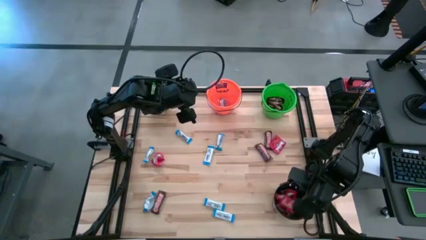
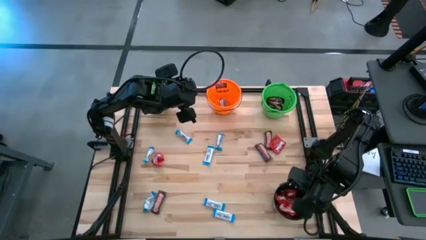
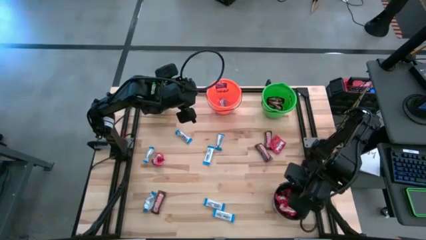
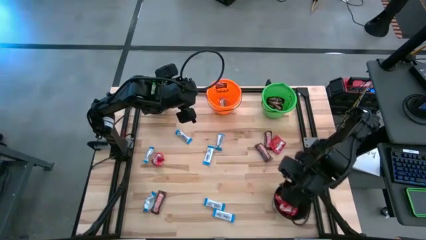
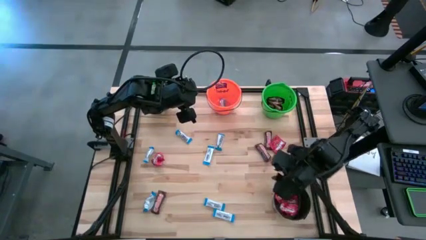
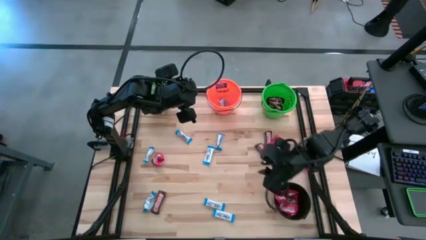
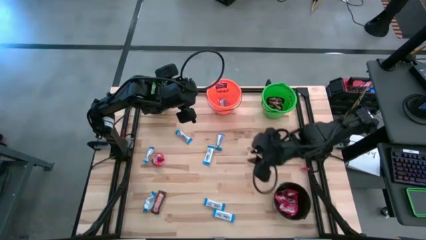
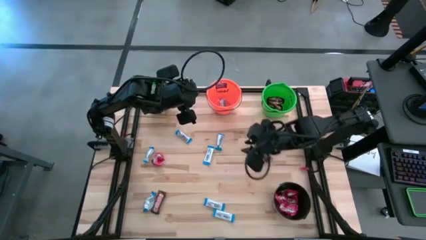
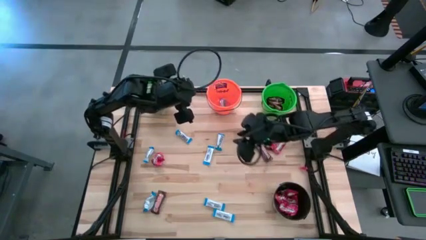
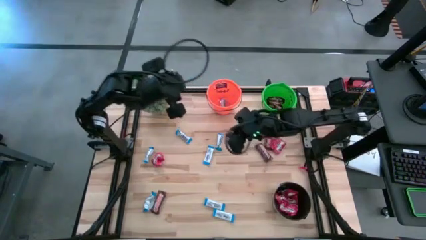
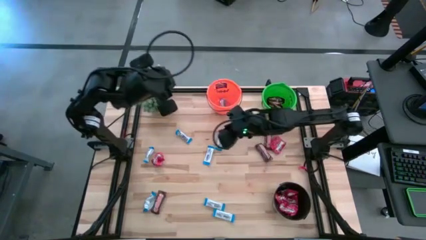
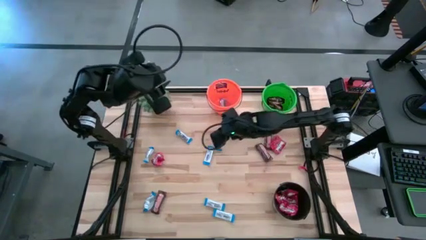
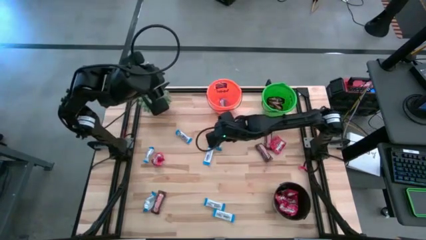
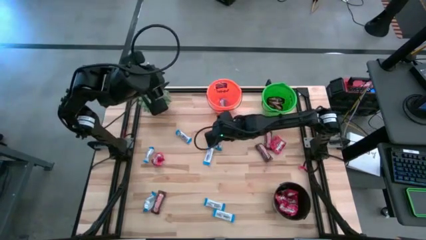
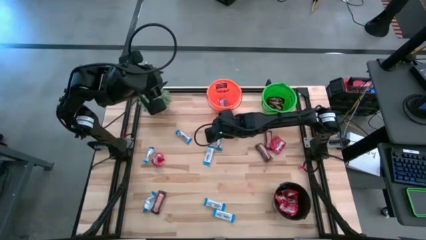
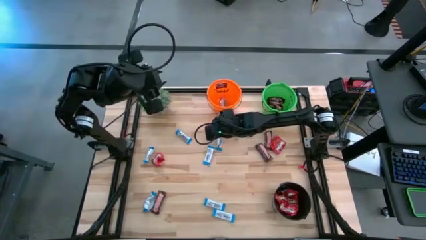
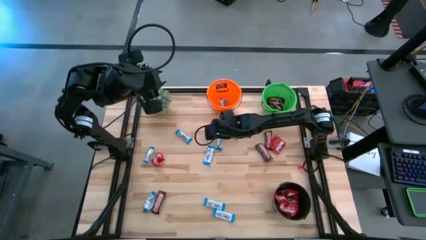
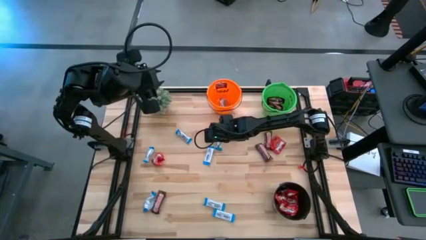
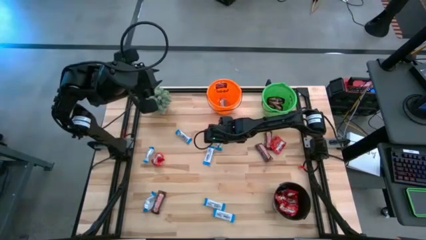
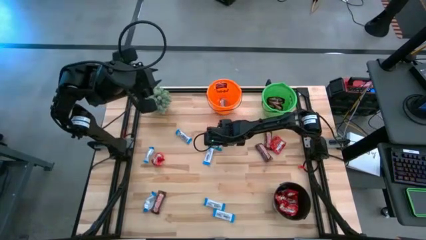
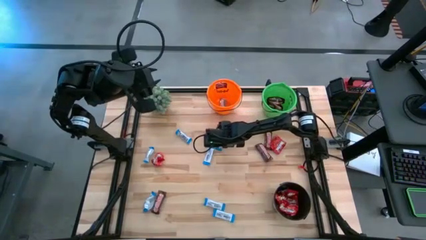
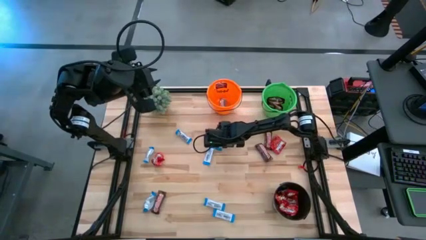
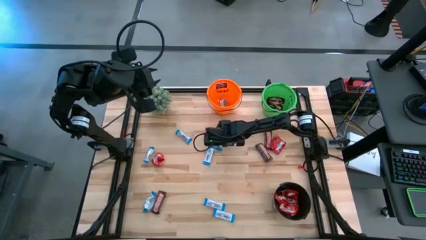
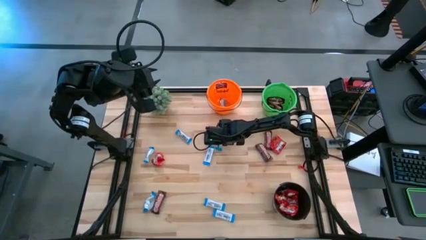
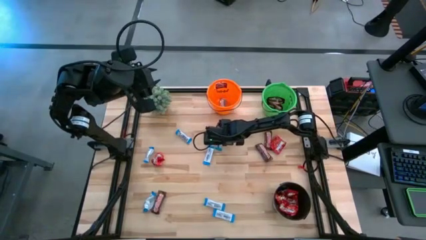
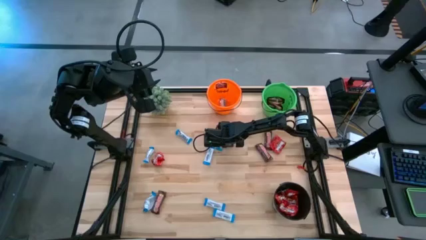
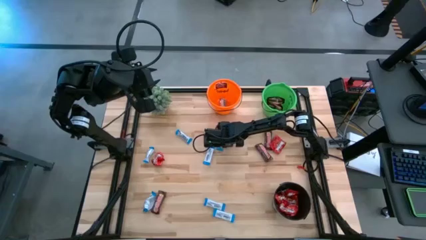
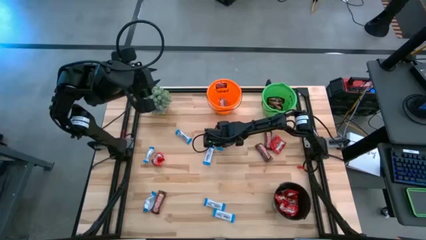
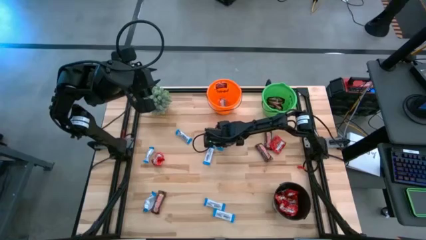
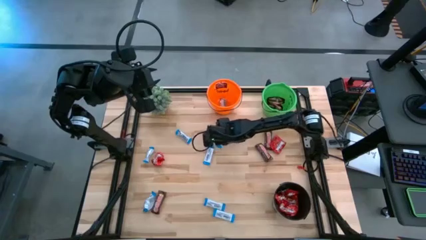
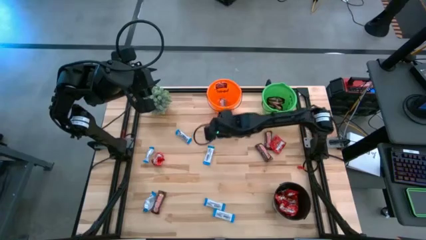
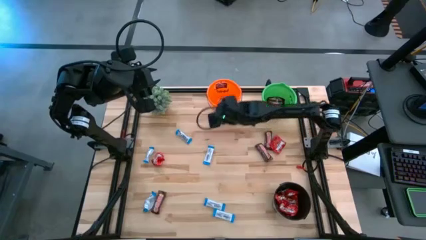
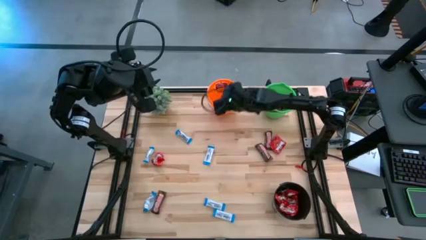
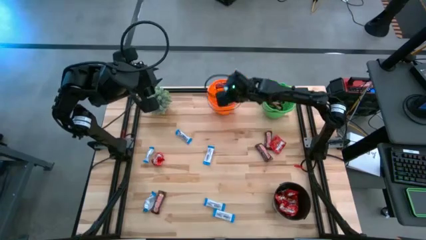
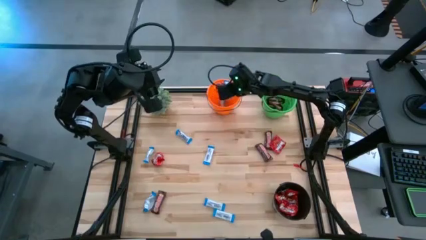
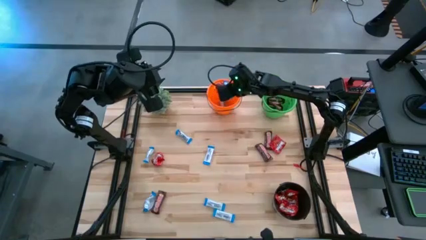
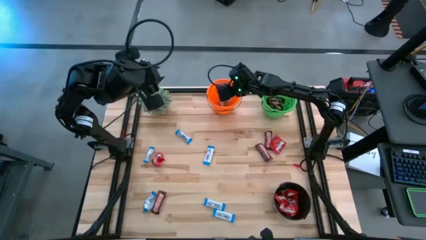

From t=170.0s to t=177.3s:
Task: Organize candy in baskets
Put the white chocolate into the orange bucket

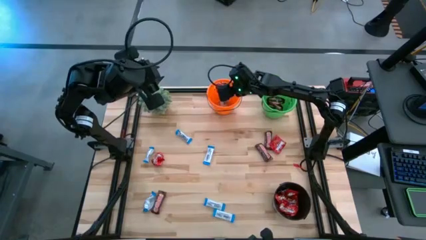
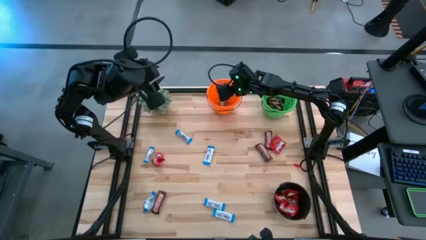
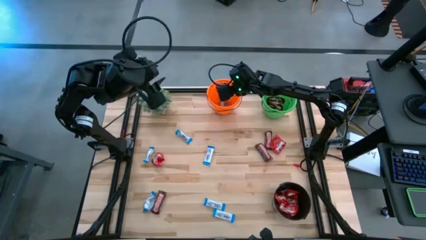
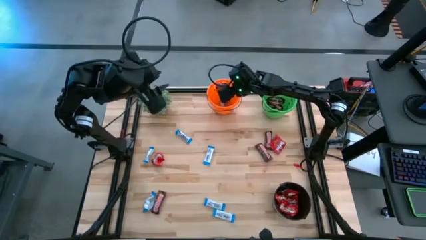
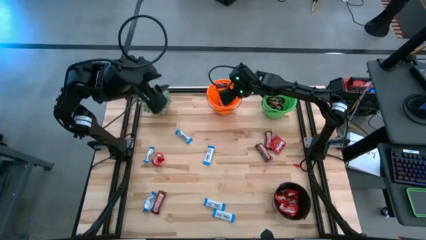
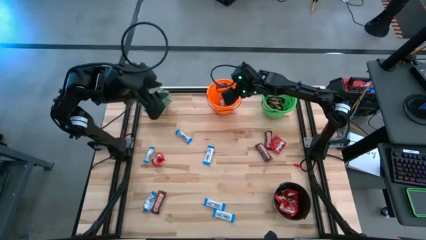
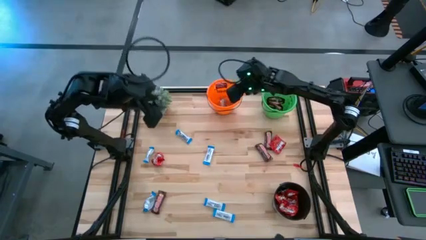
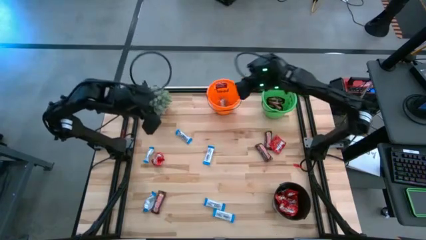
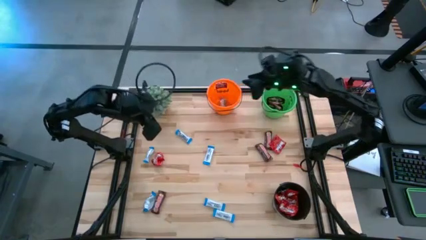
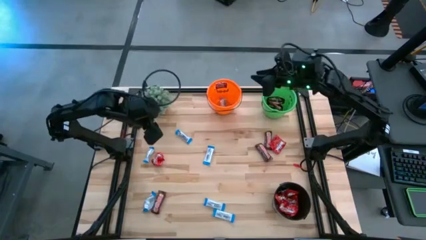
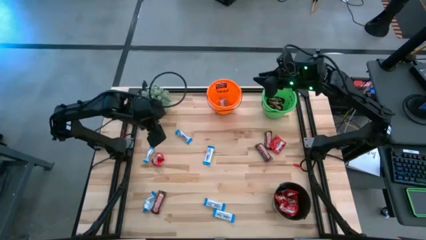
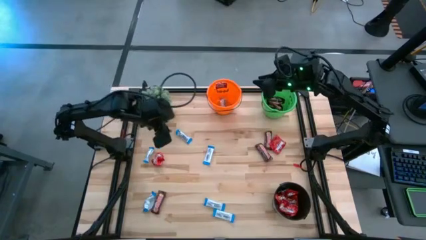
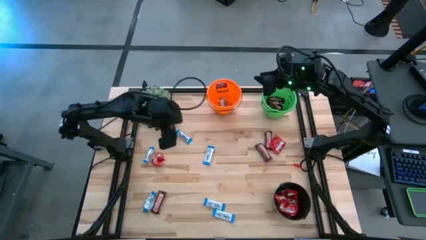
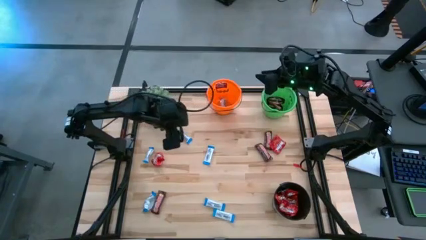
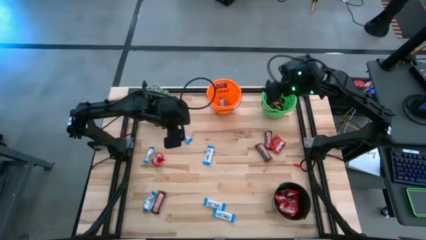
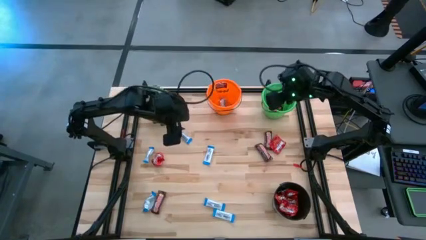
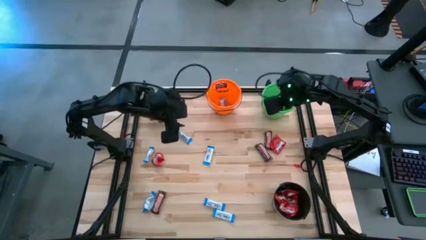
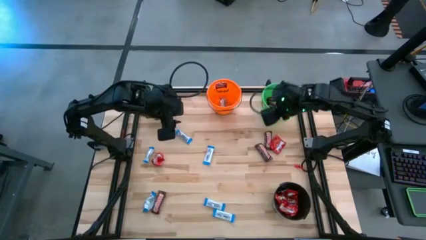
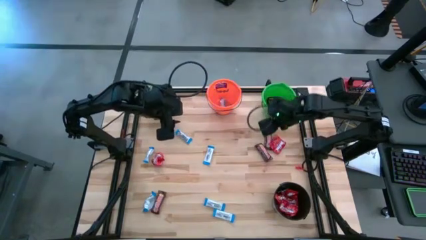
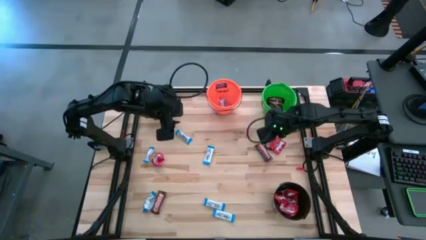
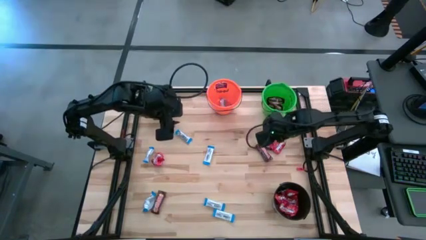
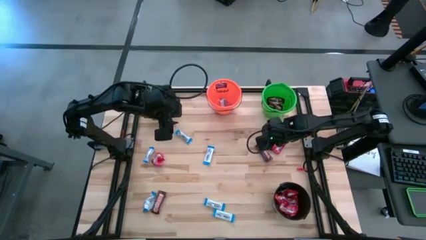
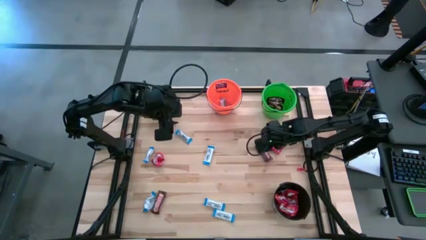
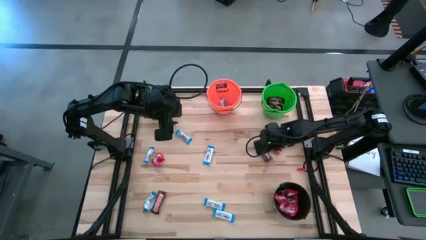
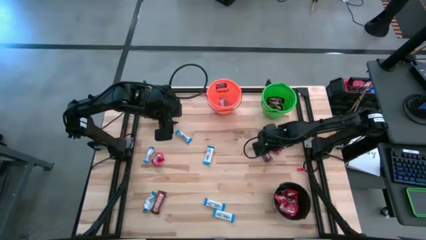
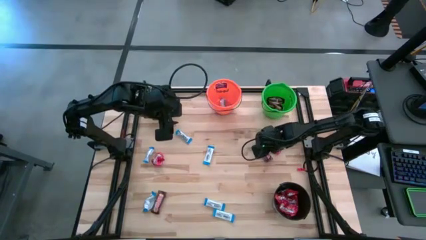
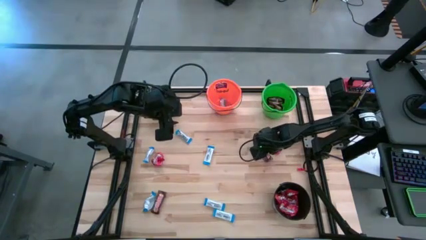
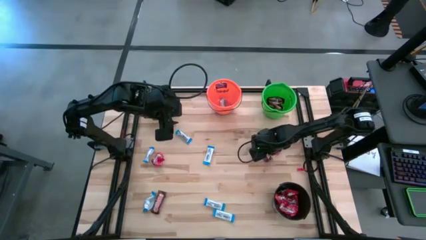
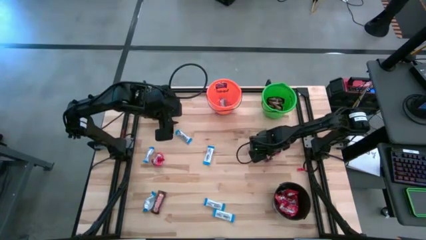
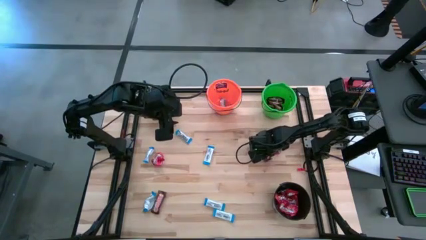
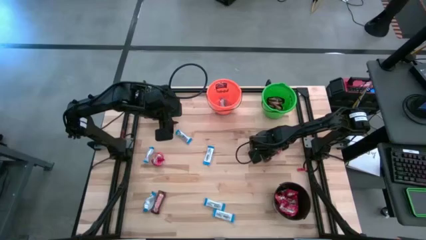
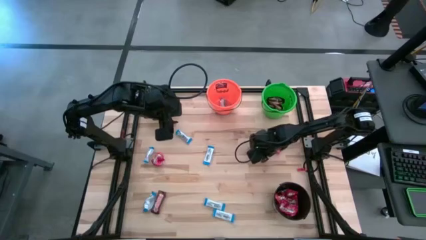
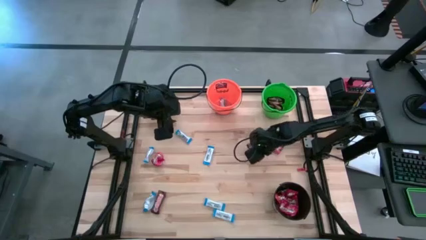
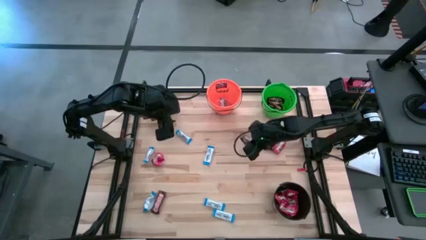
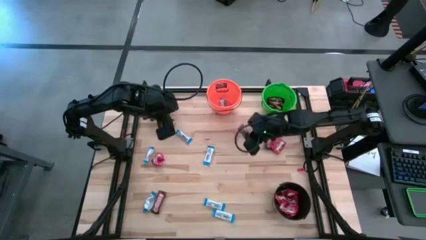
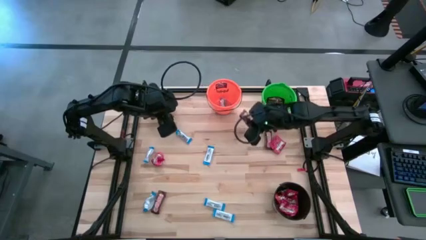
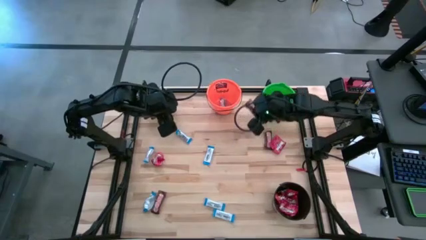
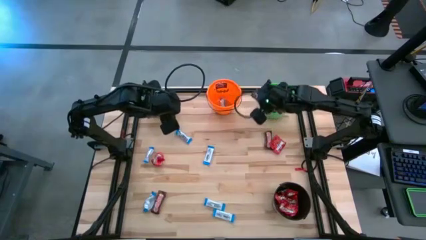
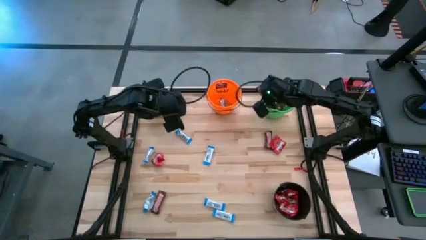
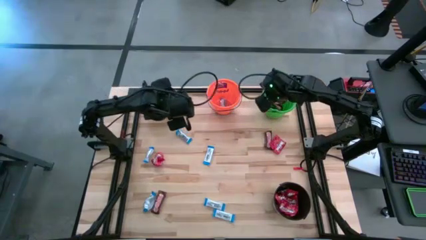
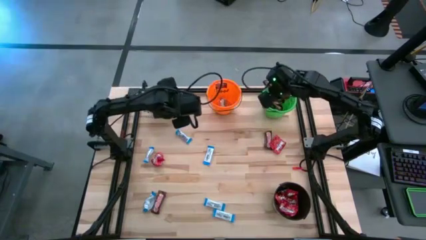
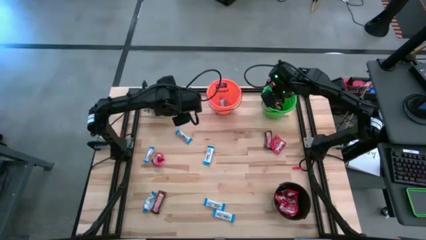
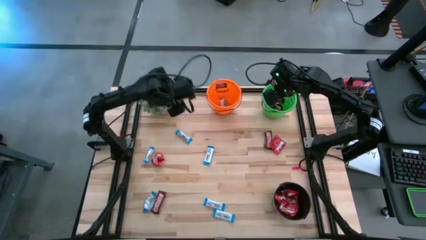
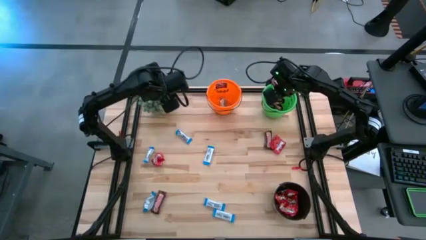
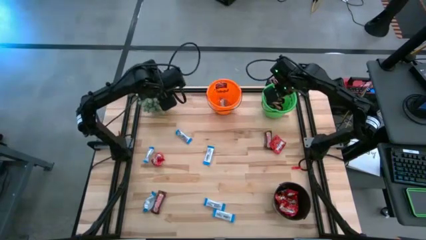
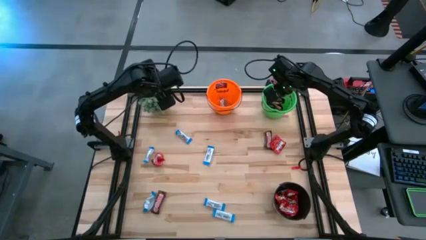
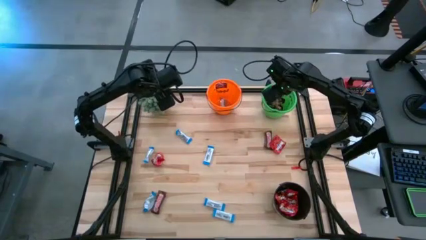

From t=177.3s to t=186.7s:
Put the brown chocolate into the green bucket
